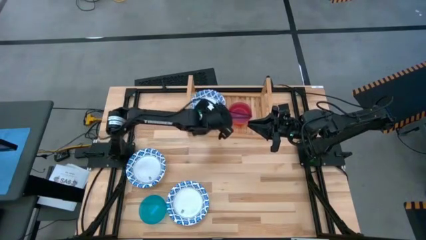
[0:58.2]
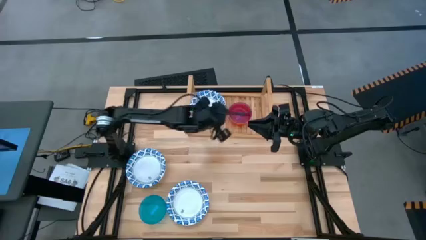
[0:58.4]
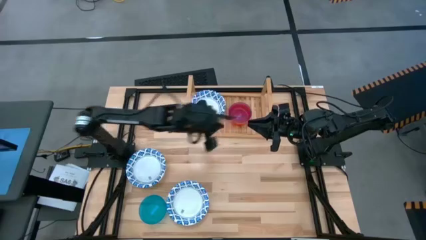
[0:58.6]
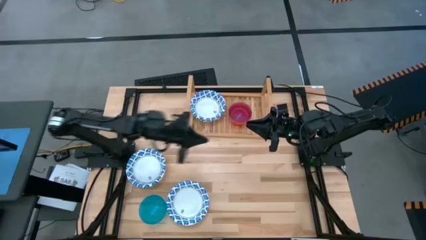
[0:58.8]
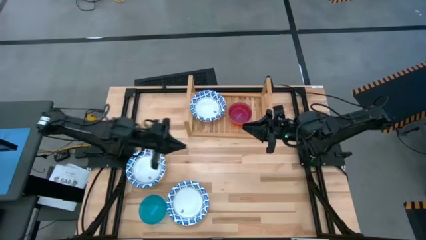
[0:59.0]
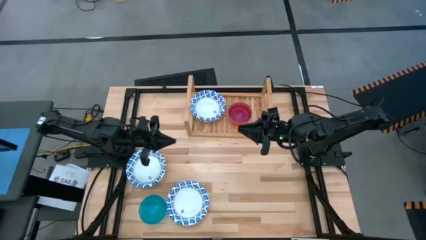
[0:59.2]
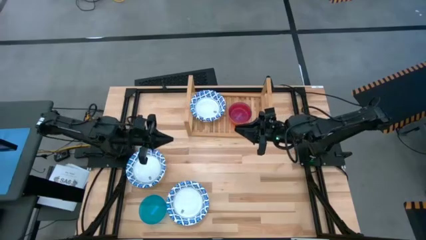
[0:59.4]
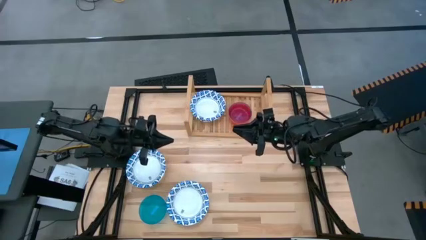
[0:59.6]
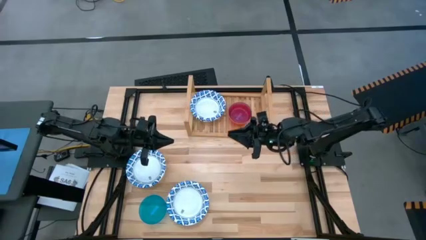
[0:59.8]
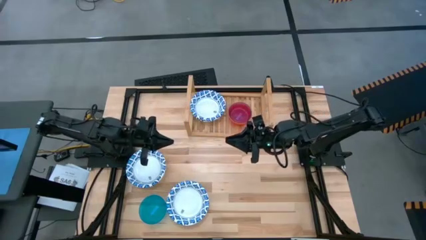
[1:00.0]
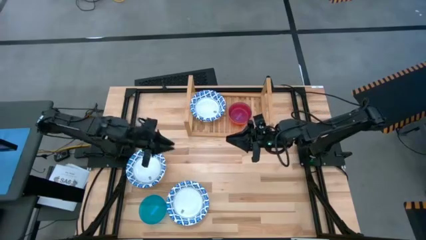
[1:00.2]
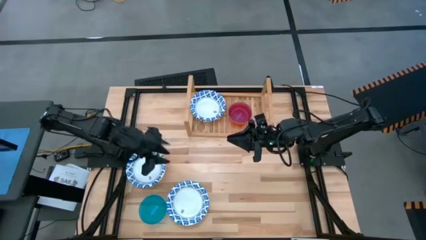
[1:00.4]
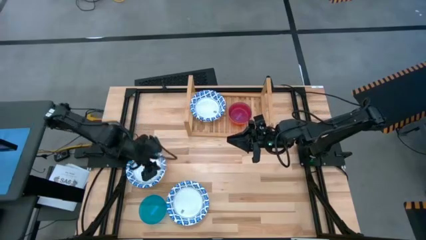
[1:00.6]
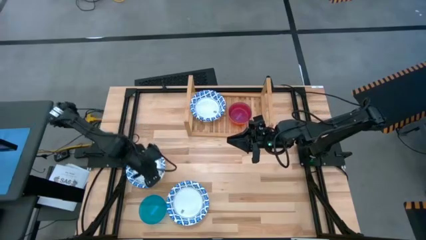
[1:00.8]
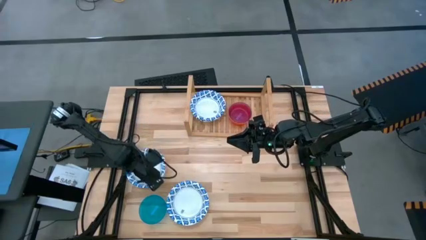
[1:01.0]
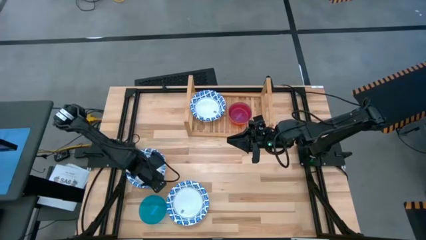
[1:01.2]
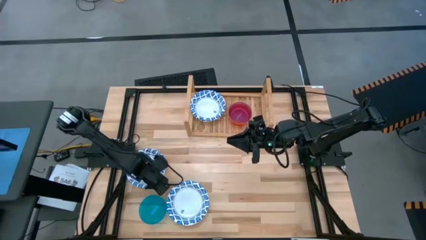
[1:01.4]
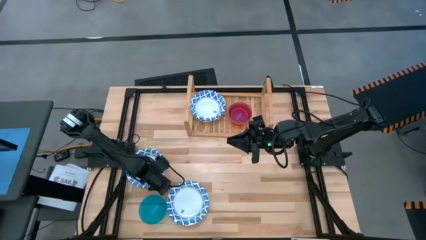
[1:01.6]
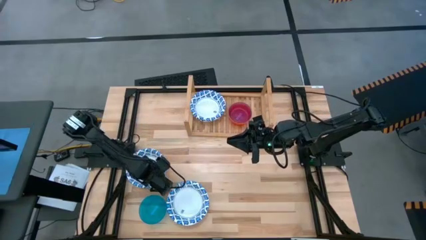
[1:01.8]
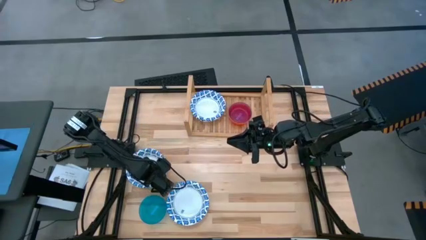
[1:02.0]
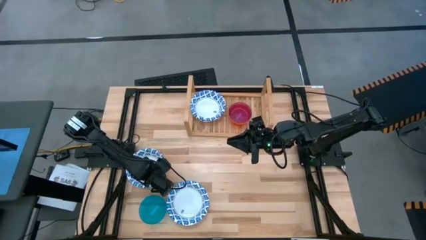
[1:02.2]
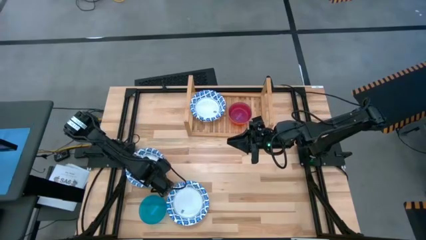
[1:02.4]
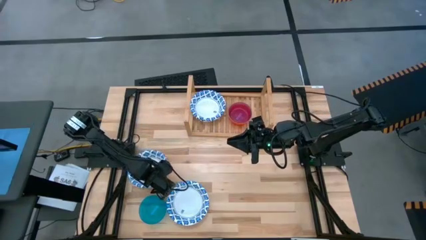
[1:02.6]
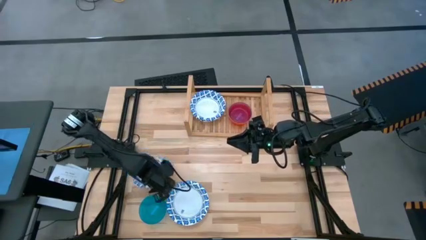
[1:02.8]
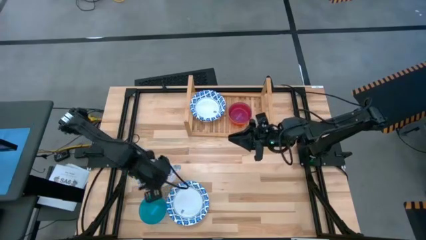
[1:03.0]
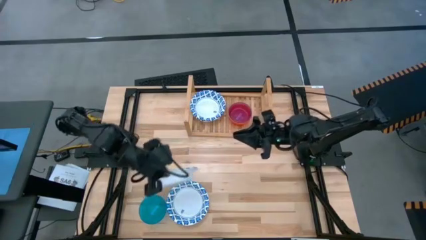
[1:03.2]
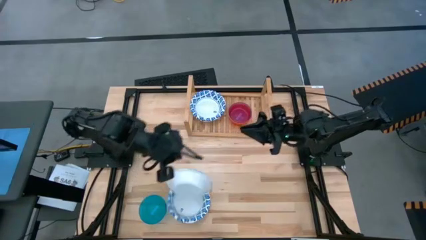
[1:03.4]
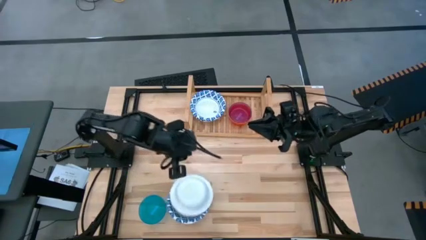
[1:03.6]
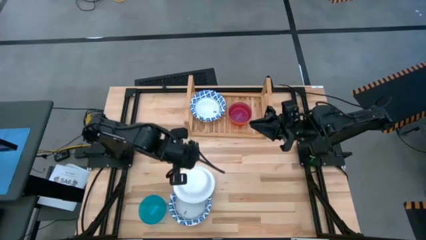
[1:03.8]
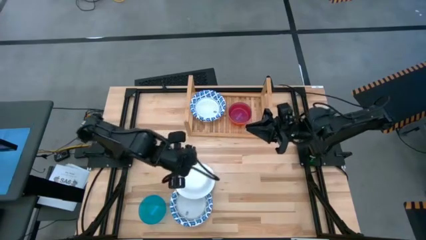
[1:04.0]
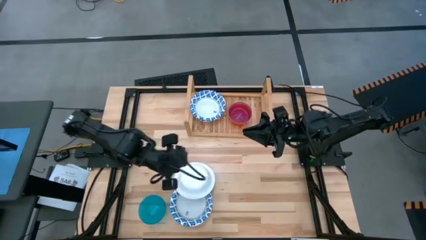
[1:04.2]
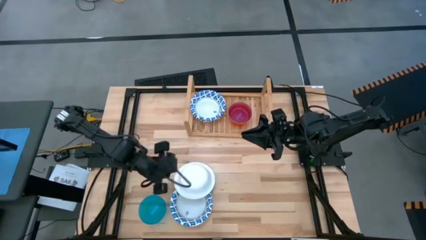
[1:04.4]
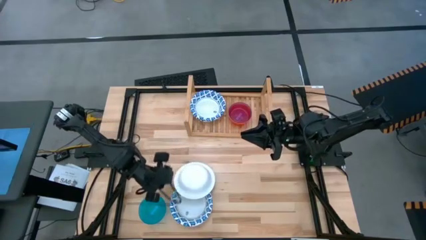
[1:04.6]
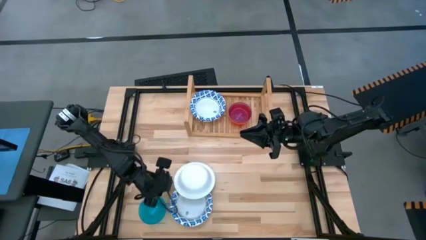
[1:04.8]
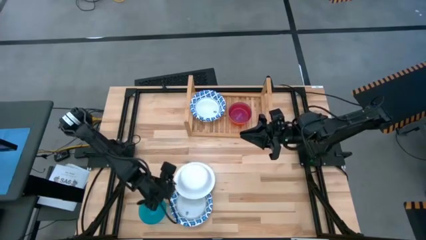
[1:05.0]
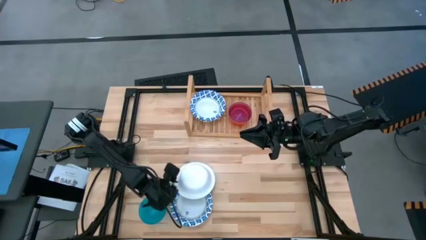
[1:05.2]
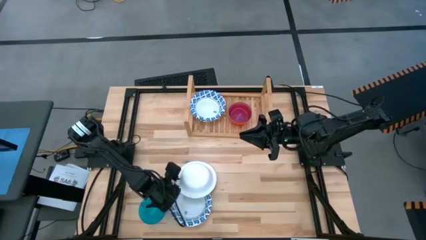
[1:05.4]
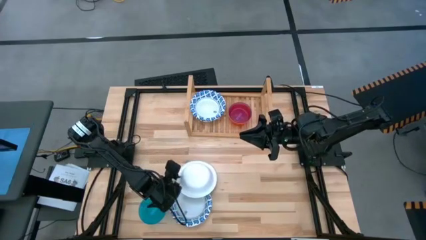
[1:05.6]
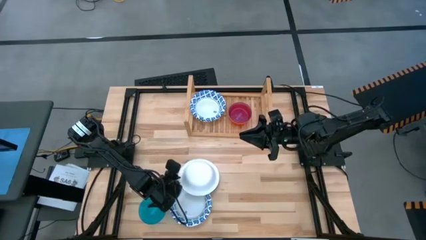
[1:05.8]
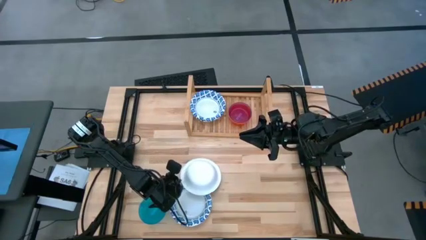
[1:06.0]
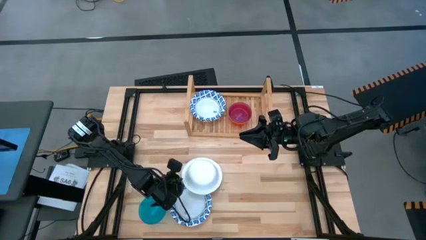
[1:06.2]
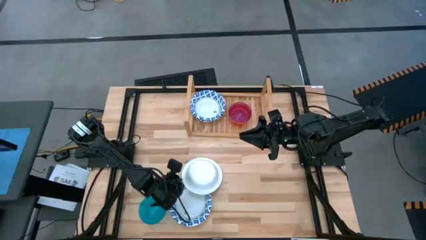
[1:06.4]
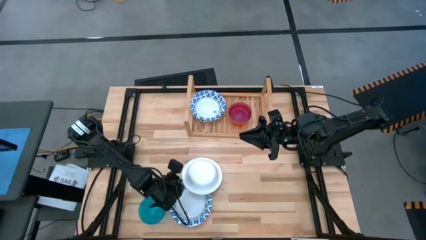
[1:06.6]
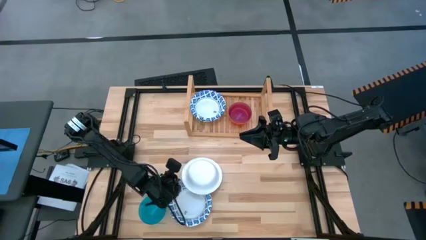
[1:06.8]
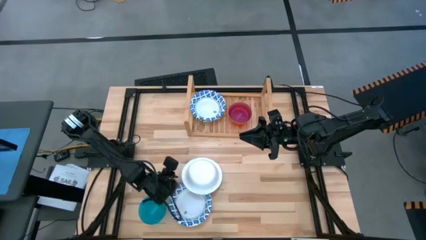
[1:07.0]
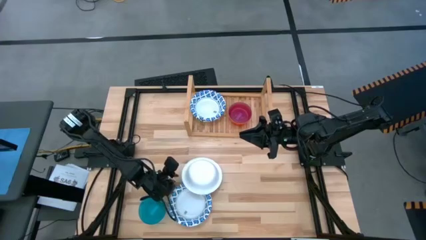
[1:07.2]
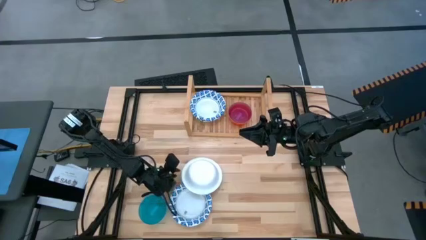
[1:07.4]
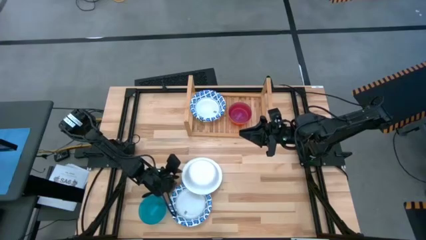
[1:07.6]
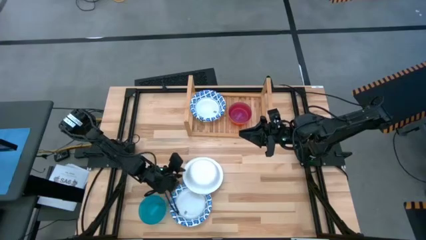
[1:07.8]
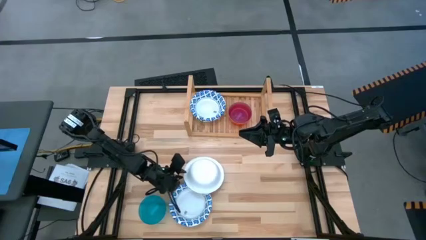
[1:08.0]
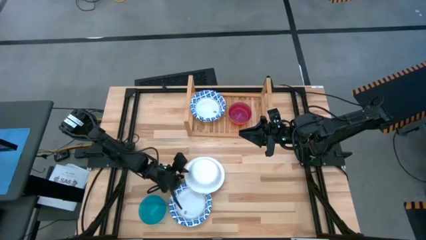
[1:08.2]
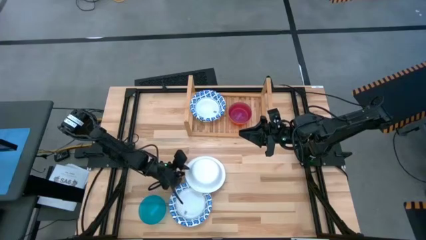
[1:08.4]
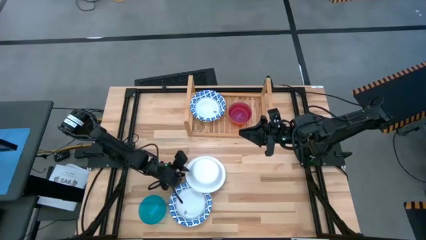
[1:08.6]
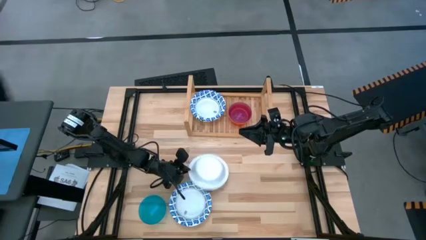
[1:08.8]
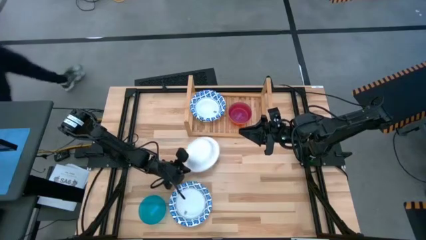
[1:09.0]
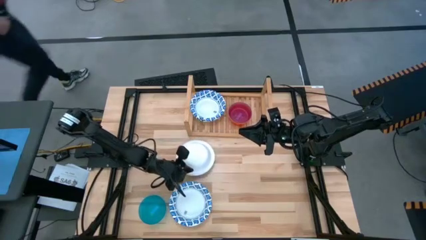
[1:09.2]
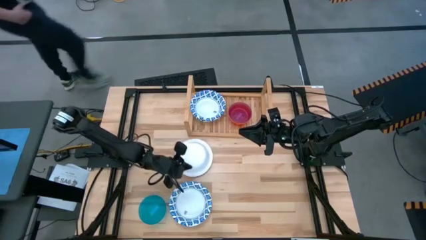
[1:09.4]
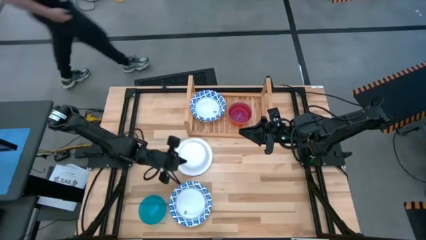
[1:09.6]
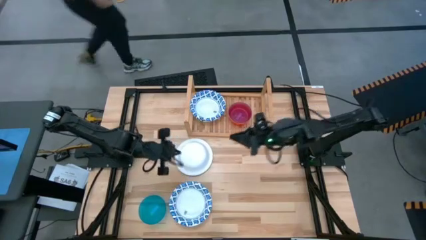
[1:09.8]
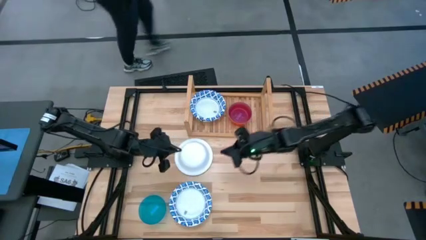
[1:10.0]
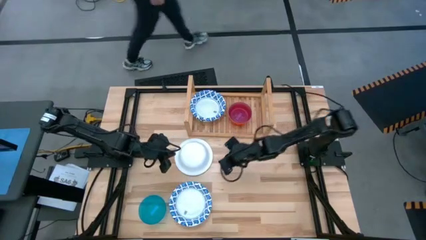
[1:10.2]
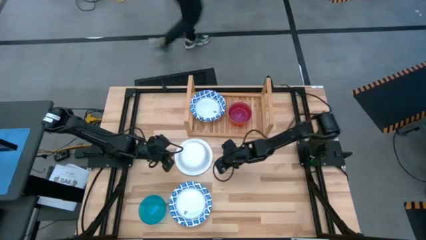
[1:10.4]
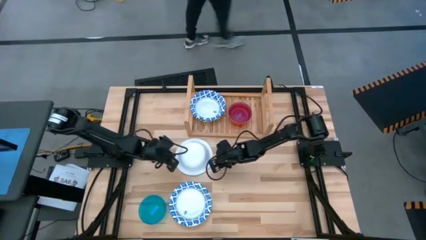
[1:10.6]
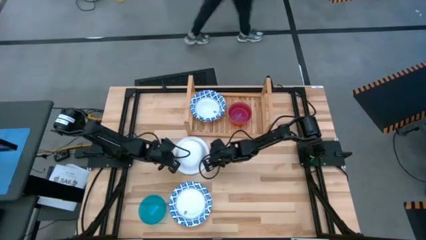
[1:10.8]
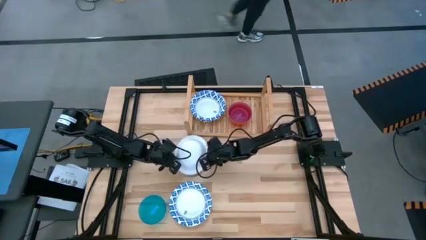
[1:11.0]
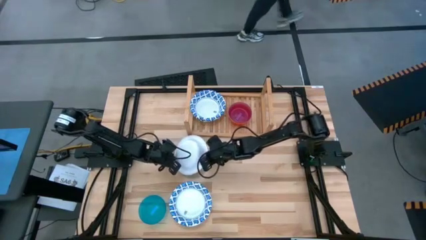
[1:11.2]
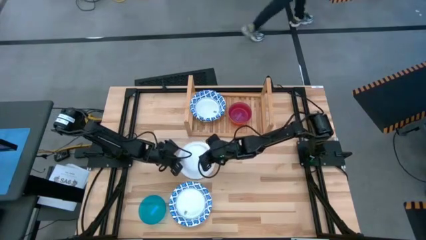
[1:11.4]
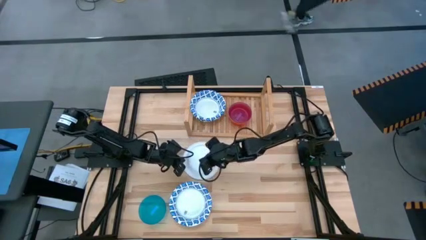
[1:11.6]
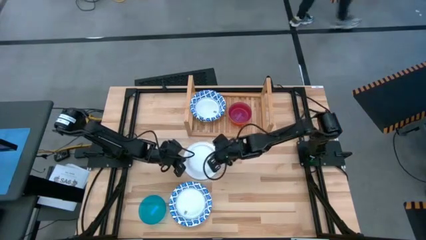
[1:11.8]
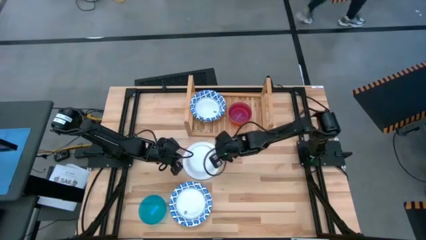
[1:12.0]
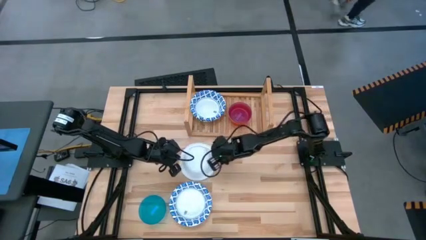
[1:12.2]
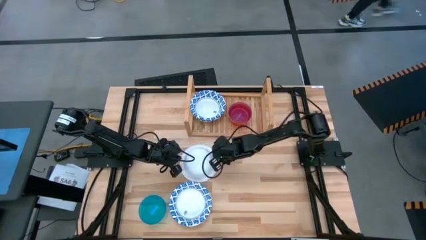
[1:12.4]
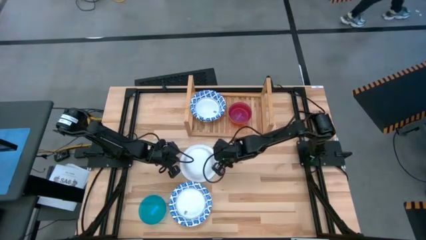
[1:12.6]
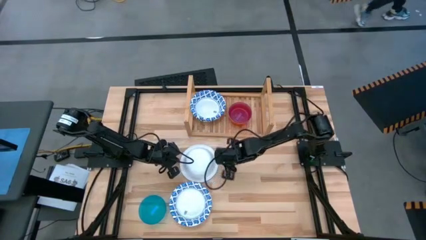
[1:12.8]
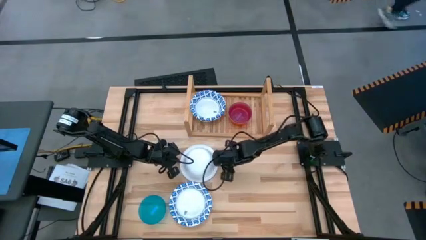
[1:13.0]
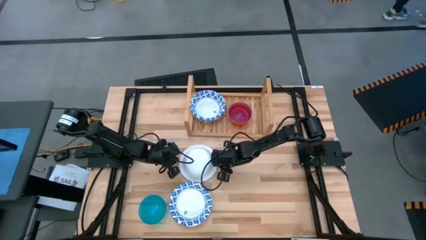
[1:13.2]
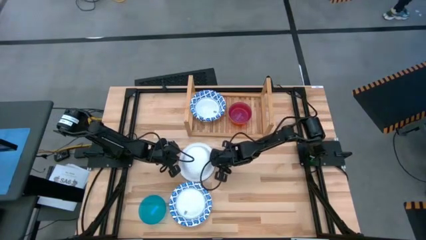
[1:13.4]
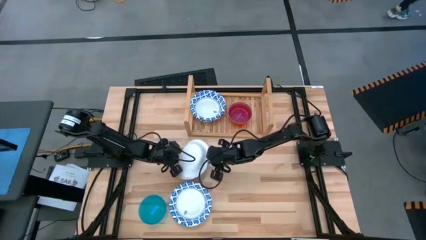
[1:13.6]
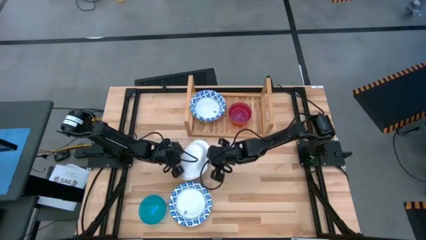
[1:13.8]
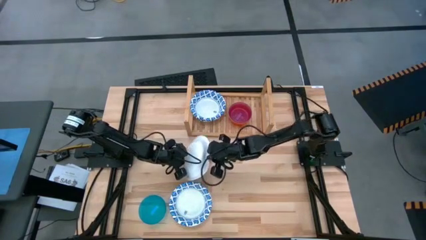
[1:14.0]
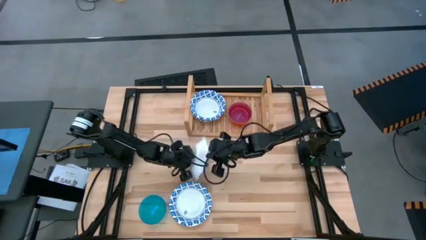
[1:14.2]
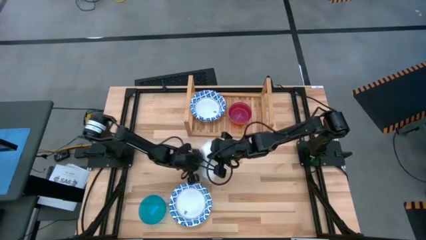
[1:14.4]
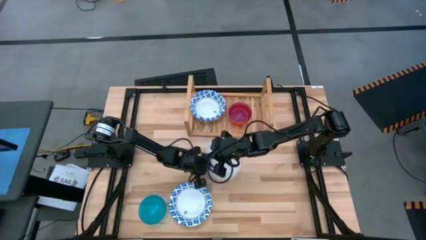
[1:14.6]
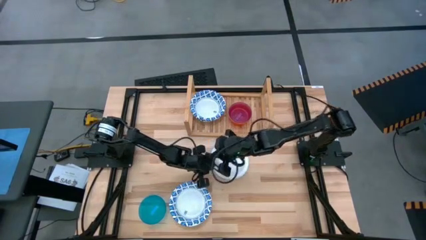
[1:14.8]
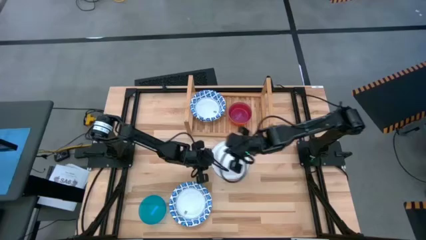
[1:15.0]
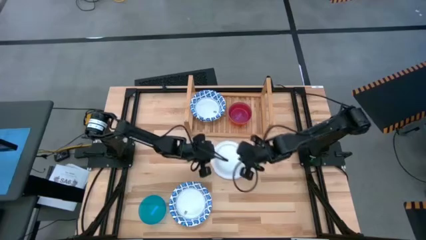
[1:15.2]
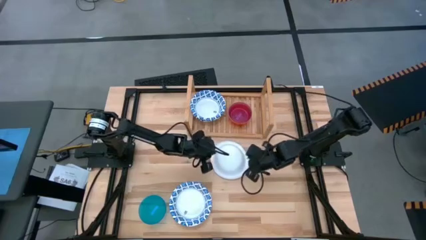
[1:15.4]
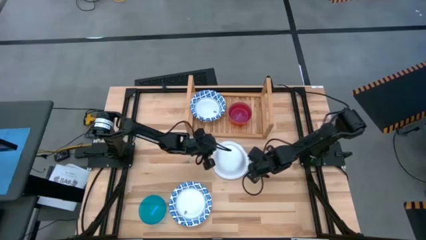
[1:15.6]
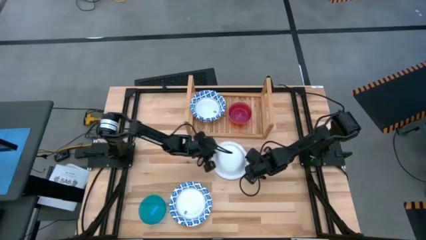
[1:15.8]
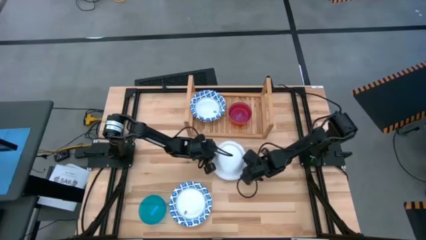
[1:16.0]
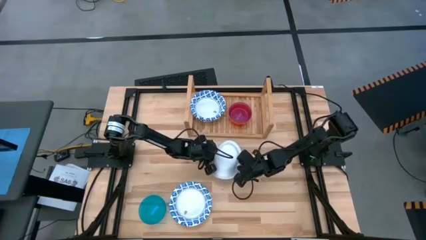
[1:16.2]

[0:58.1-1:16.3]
Task: Place and stack bowls onto a shelf
Stack the top blue pattern bowl on top of the other blue pattern bowl on the shelf
